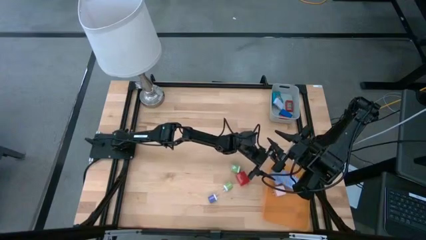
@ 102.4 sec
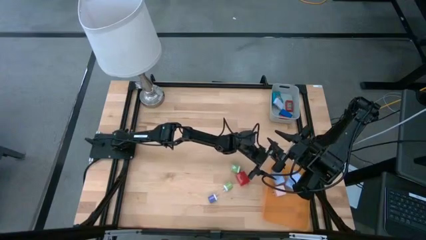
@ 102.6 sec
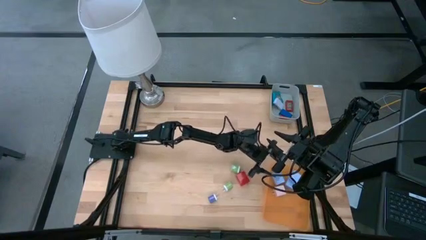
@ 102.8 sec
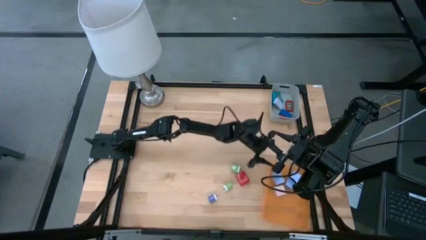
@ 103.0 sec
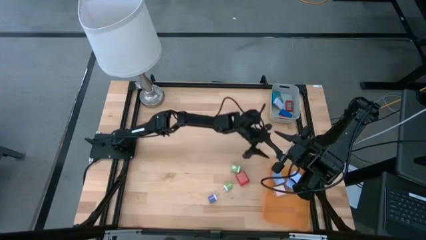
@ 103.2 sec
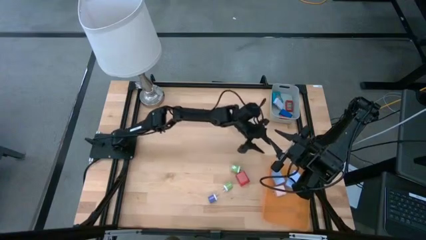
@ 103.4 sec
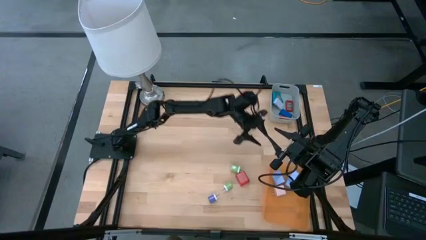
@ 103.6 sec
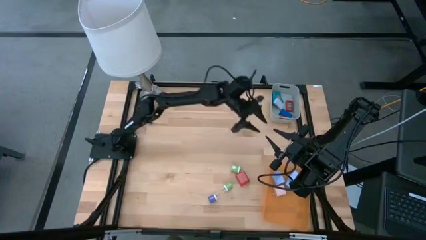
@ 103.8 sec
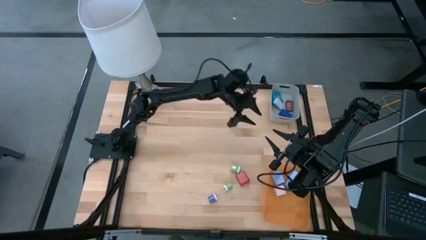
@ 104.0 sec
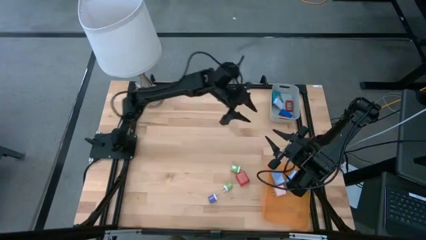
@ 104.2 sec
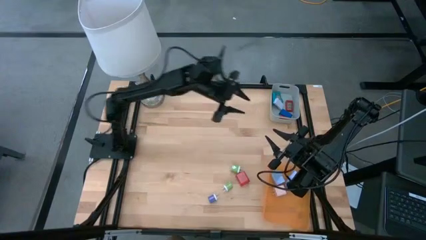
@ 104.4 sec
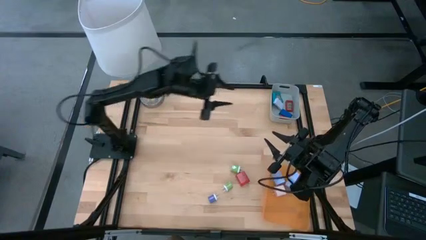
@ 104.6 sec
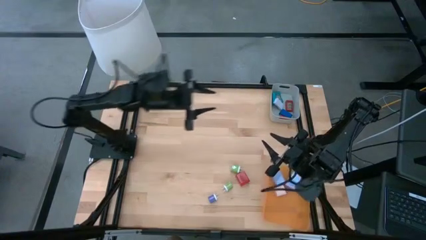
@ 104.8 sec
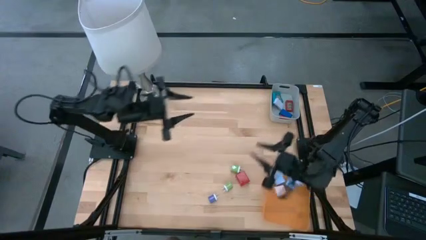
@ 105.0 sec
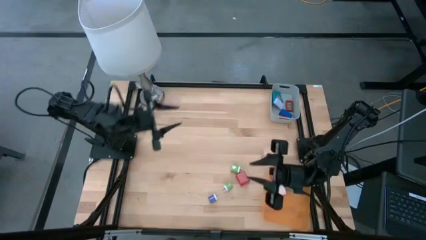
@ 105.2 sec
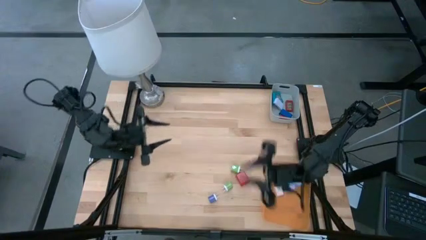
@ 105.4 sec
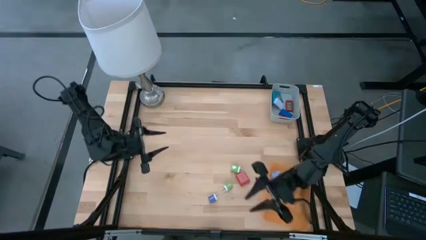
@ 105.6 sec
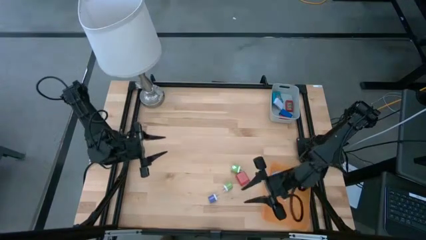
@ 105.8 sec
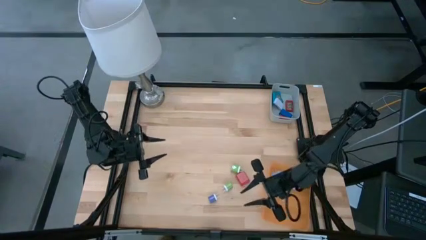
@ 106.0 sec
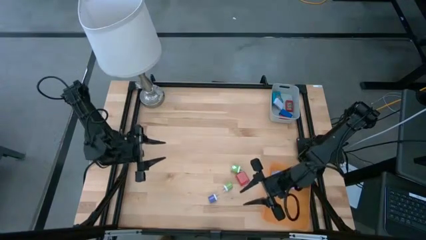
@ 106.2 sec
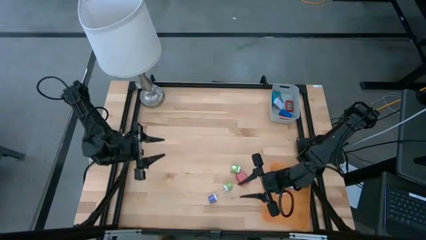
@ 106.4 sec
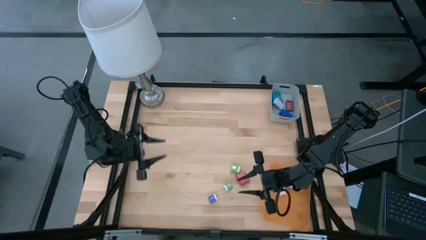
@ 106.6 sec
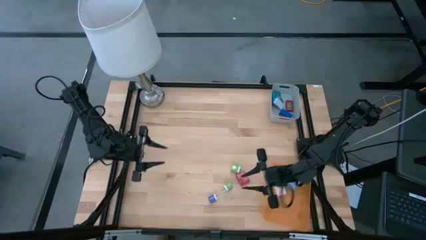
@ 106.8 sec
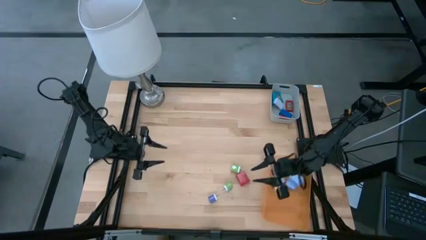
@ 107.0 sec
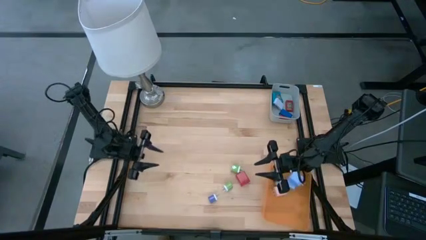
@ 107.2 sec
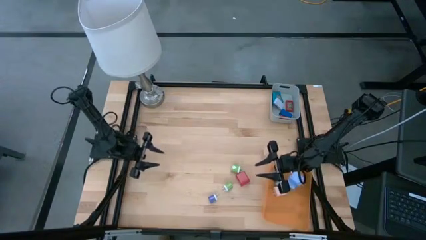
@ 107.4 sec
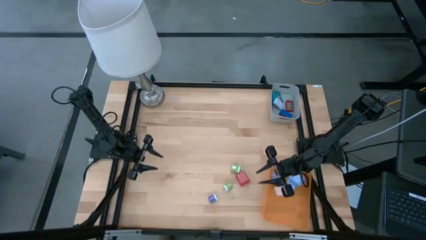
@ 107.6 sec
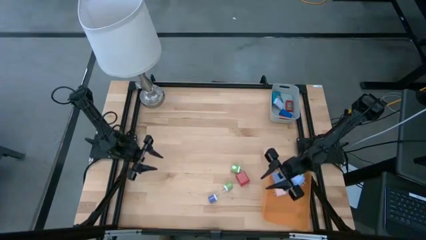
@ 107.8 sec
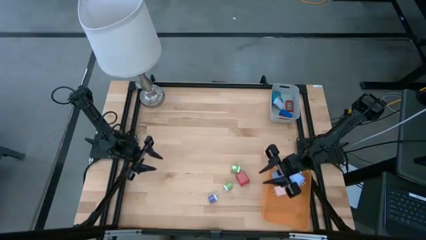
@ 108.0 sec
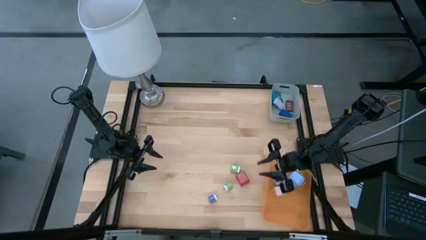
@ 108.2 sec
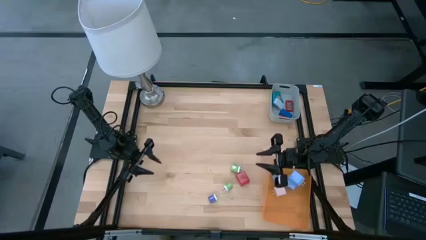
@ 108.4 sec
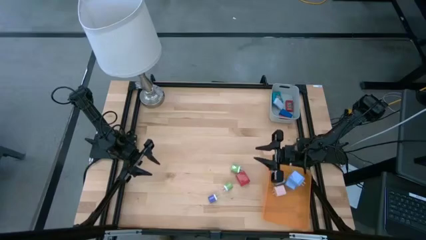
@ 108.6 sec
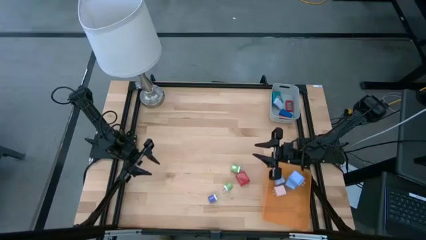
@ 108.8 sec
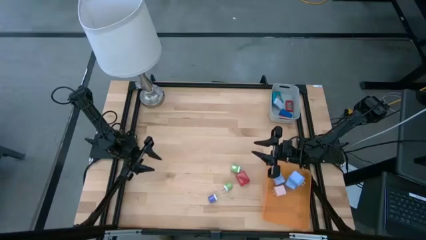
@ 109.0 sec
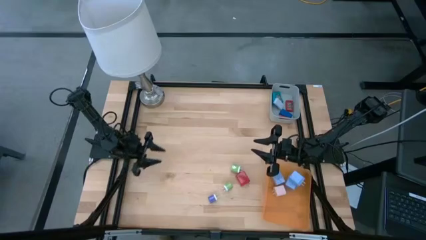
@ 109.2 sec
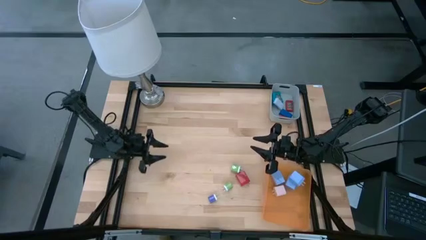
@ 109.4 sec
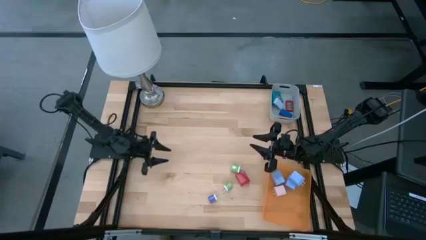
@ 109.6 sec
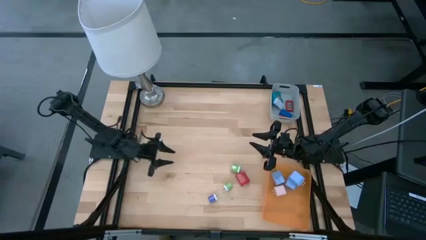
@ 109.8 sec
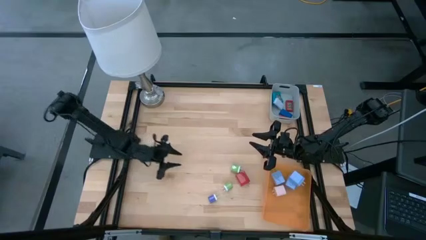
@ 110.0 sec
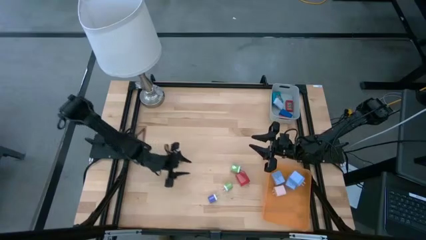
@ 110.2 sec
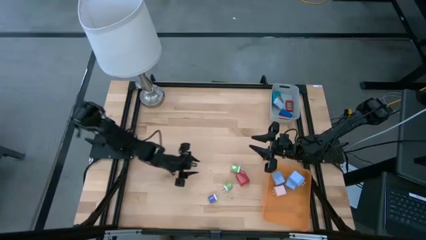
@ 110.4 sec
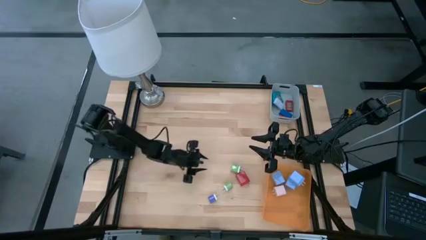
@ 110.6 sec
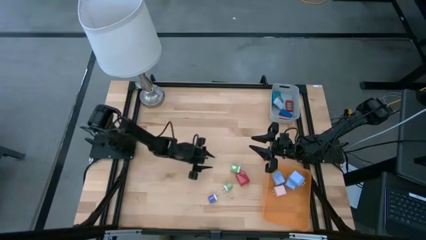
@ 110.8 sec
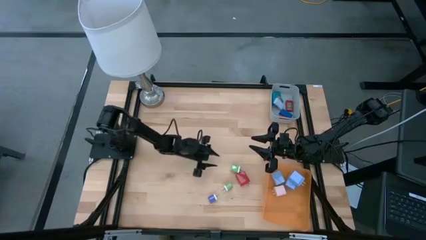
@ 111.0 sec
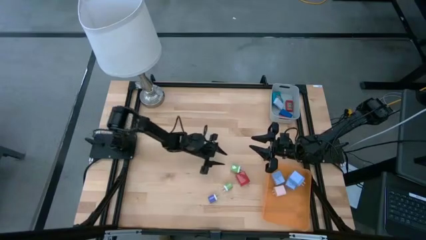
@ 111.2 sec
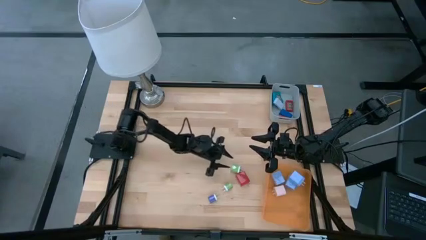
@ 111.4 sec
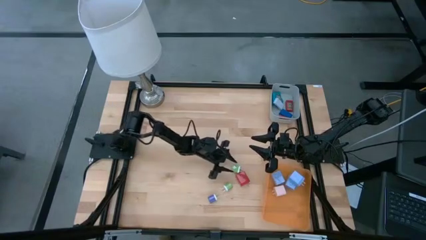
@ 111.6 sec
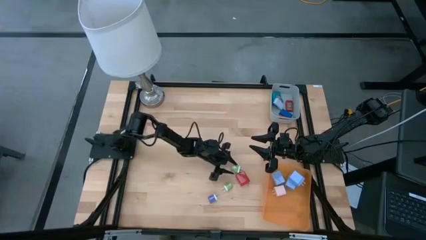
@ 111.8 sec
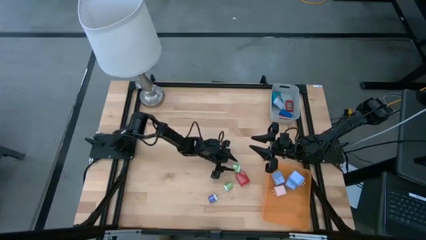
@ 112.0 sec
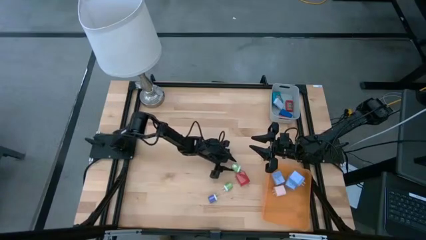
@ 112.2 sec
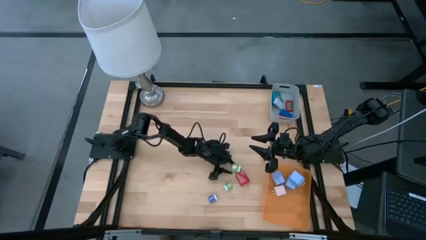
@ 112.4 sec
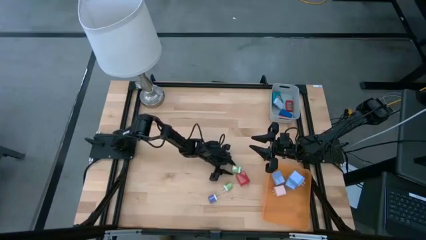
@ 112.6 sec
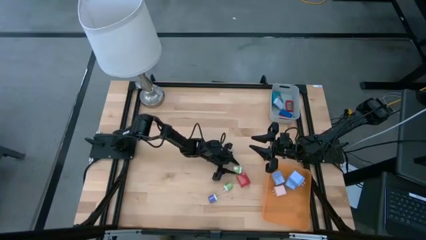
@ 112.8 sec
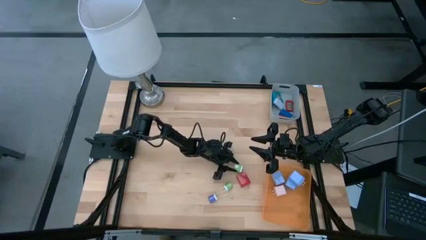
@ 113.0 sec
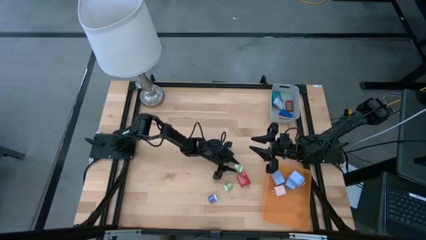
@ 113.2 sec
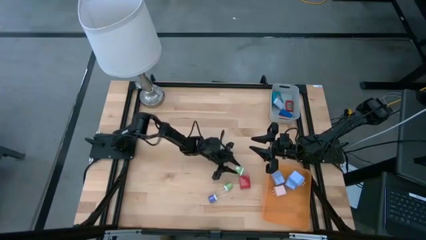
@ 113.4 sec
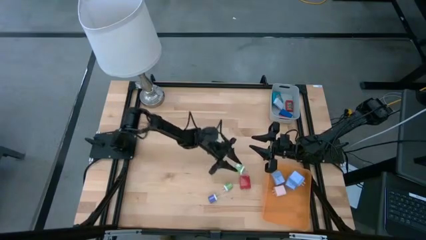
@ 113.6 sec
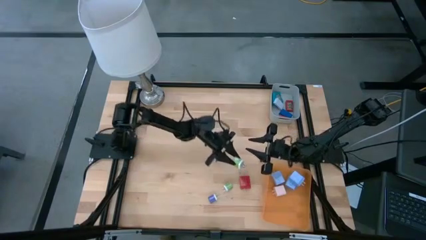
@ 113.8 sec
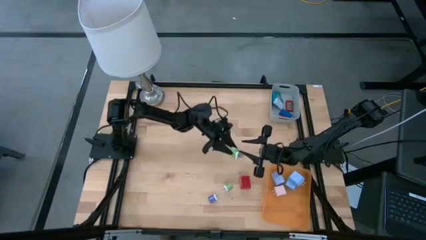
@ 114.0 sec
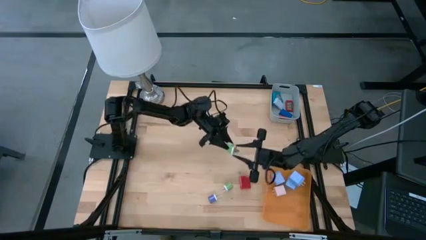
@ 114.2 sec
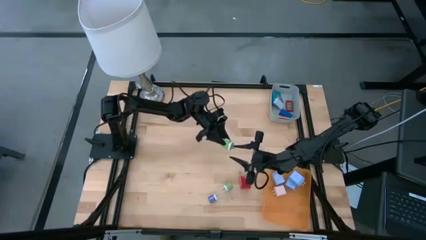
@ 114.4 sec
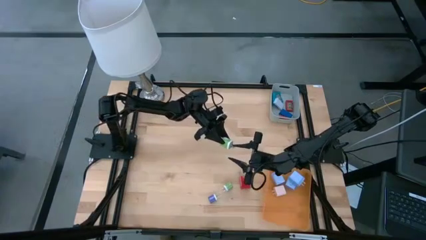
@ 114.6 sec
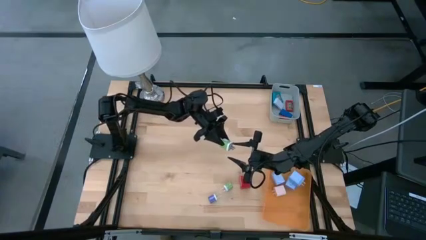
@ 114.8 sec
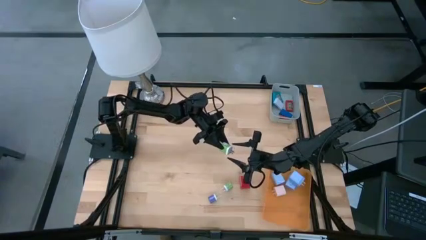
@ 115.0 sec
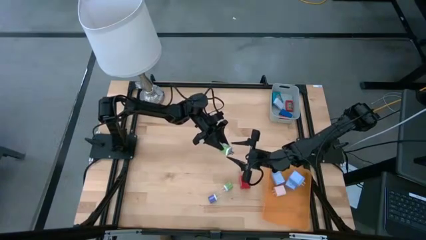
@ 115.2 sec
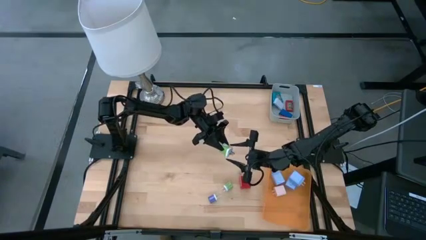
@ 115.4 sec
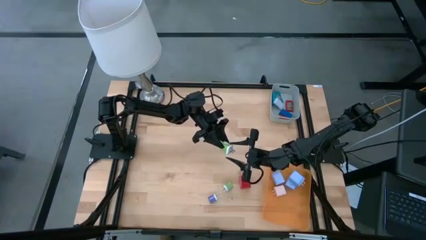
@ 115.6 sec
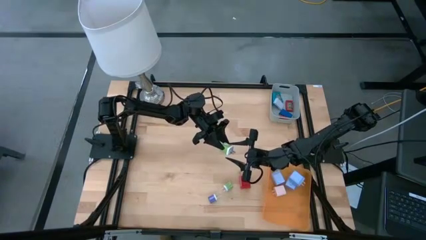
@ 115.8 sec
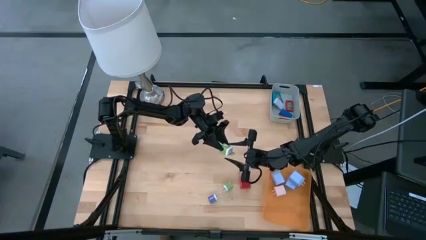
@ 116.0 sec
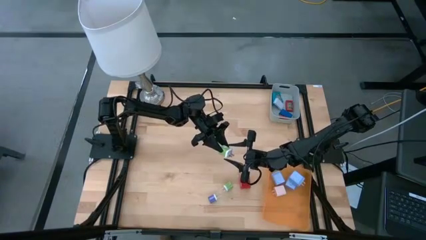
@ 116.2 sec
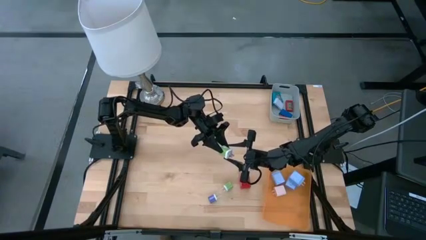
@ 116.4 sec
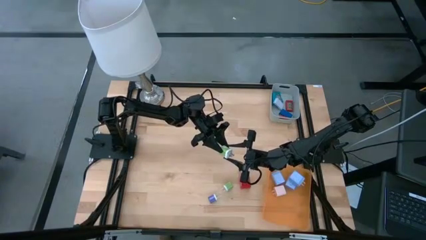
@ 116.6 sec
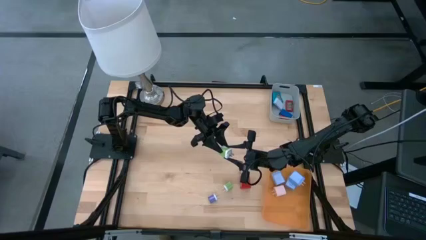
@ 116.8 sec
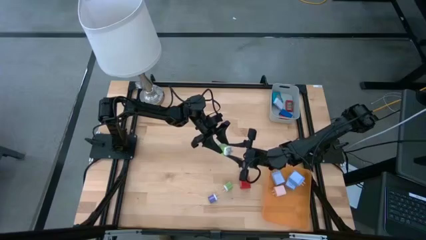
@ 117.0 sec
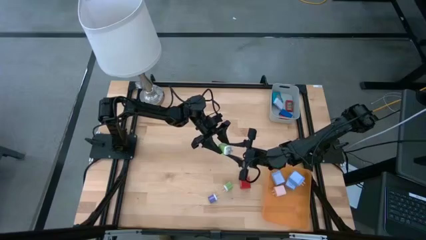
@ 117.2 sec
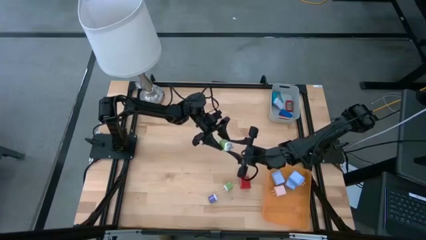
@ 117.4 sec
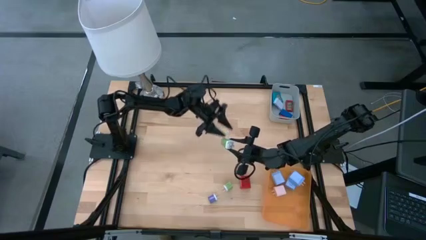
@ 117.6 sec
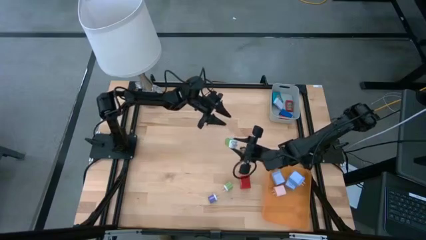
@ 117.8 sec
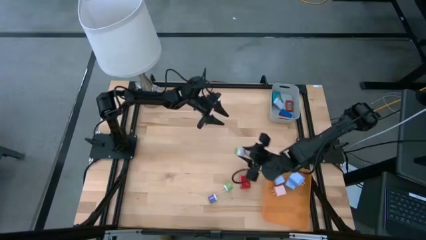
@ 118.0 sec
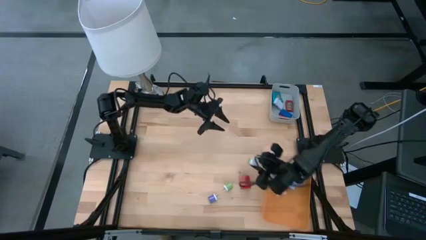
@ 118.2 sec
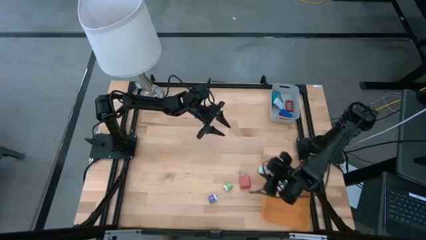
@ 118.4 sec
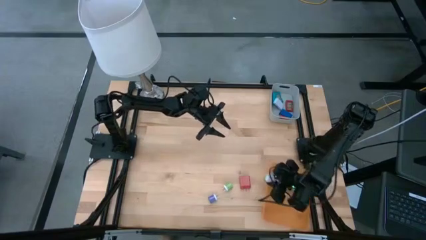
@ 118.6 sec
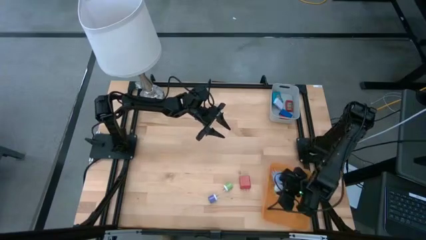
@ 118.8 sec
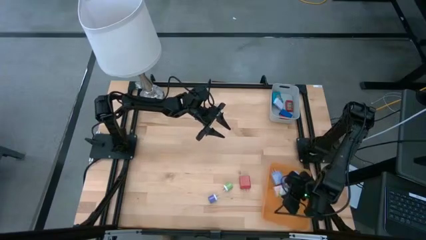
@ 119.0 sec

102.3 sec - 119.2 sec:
Task: Pick & Place Office items
Put the top green charger adapter into the orange bin
